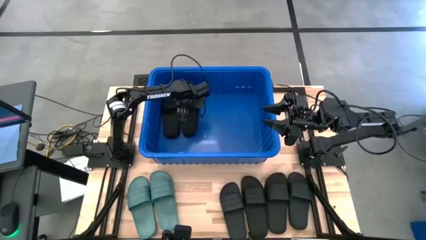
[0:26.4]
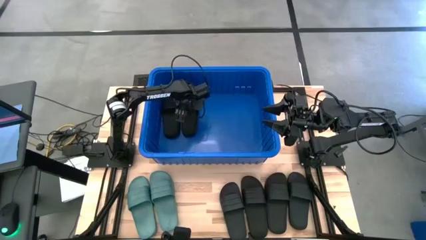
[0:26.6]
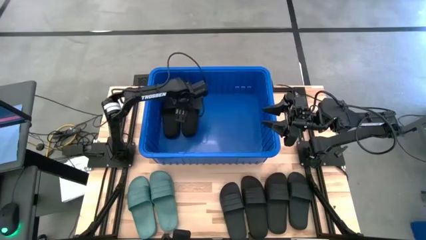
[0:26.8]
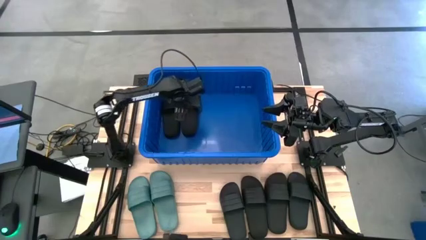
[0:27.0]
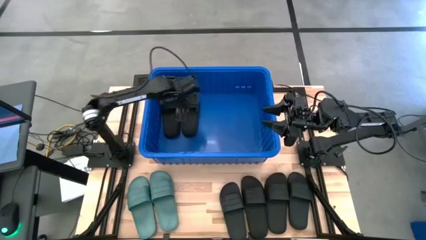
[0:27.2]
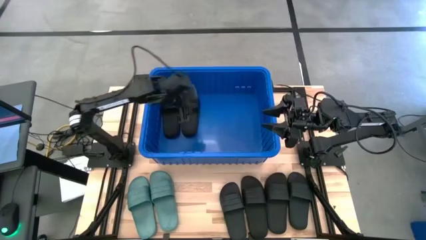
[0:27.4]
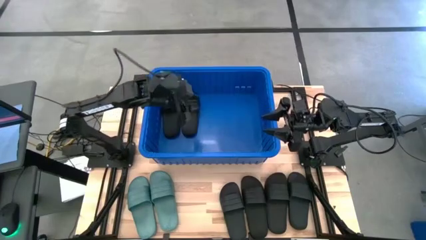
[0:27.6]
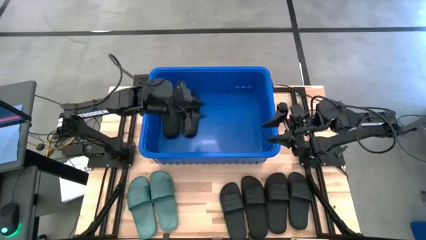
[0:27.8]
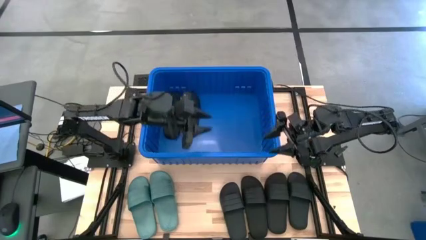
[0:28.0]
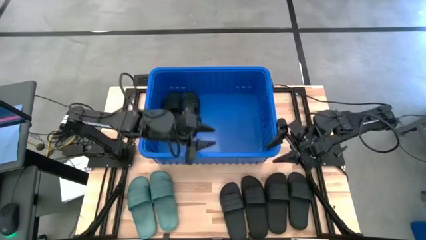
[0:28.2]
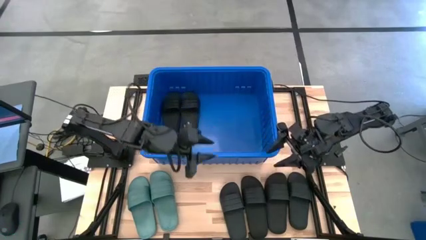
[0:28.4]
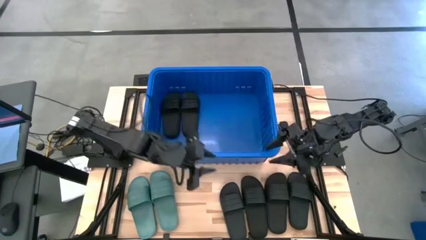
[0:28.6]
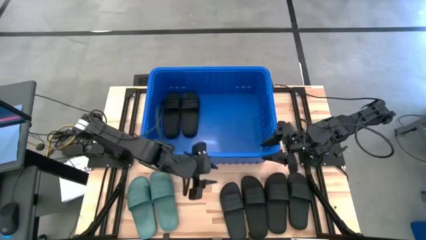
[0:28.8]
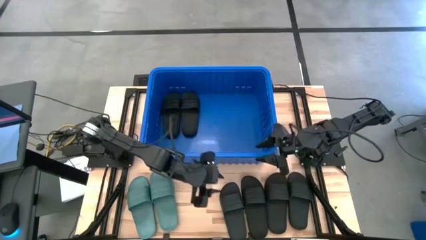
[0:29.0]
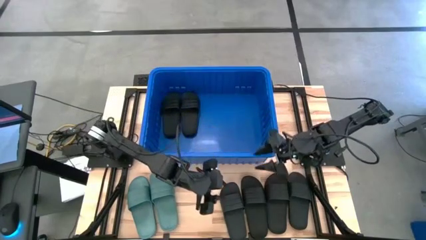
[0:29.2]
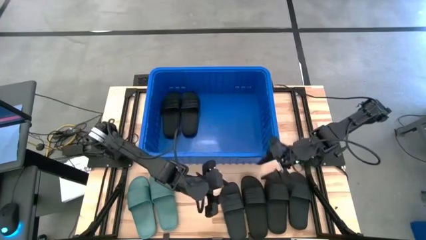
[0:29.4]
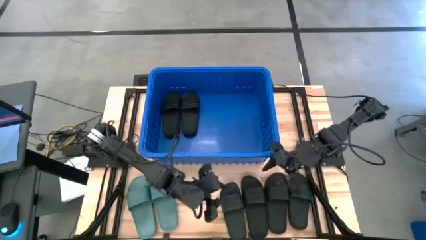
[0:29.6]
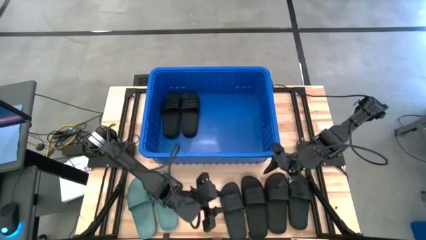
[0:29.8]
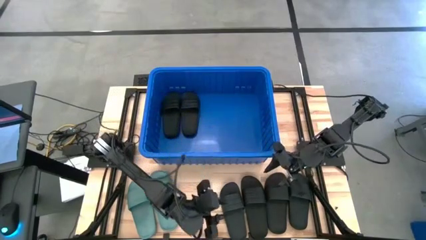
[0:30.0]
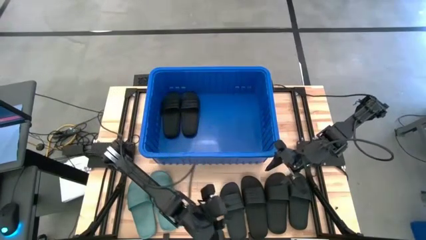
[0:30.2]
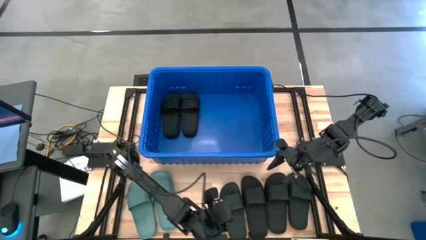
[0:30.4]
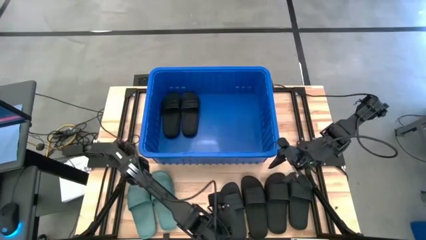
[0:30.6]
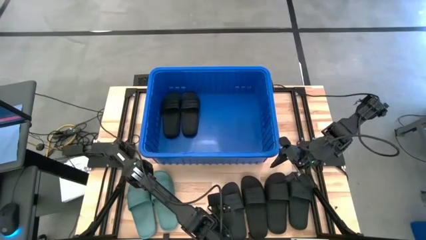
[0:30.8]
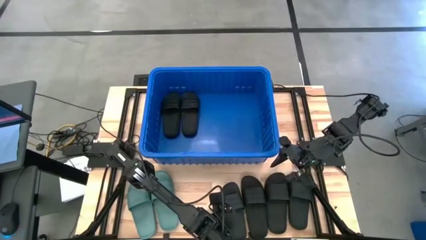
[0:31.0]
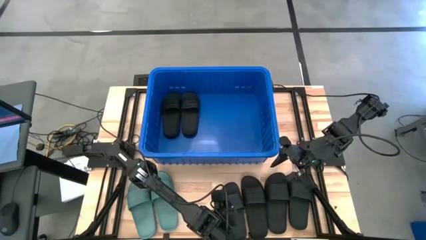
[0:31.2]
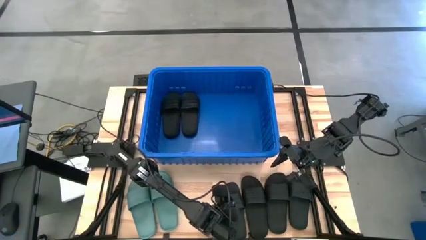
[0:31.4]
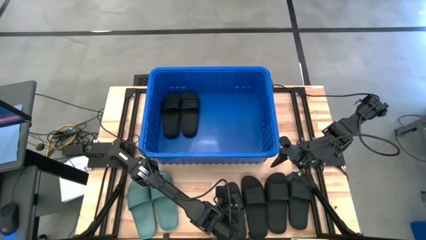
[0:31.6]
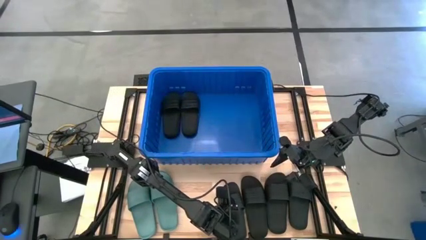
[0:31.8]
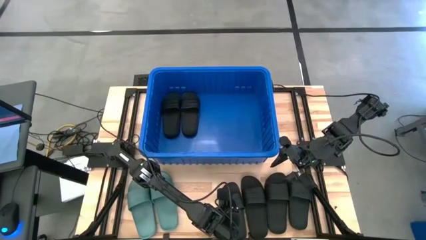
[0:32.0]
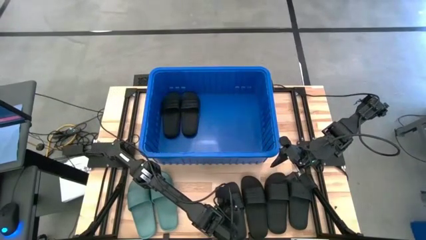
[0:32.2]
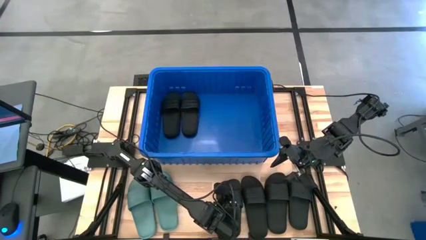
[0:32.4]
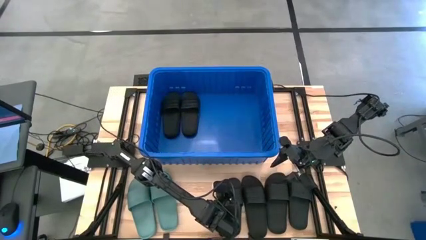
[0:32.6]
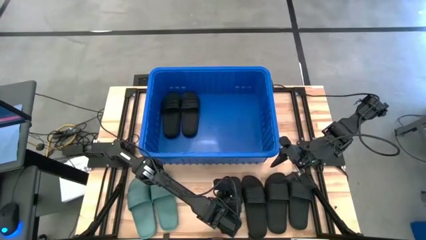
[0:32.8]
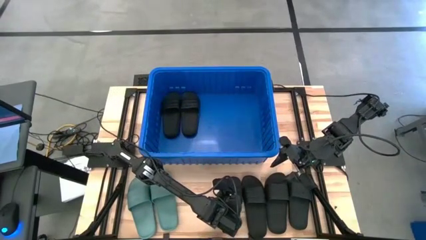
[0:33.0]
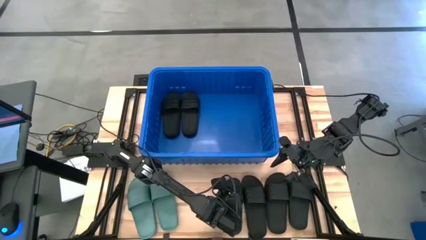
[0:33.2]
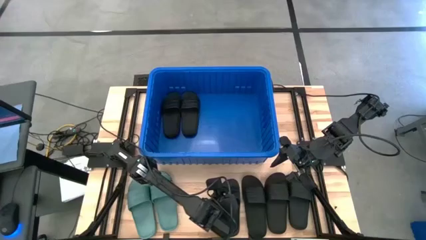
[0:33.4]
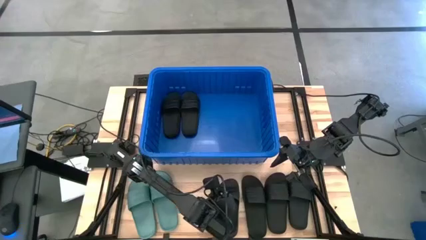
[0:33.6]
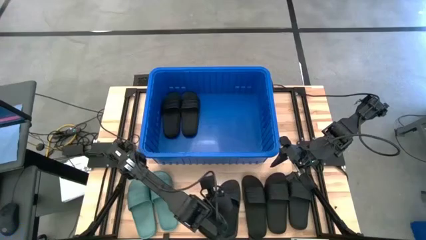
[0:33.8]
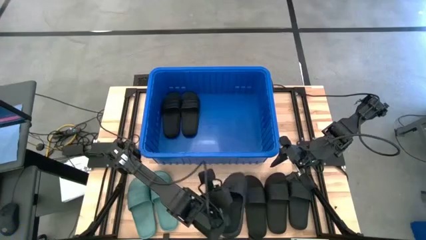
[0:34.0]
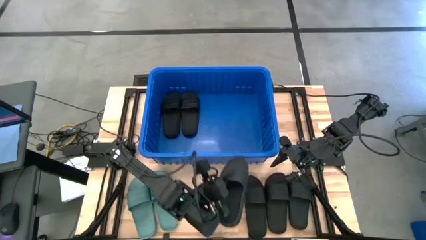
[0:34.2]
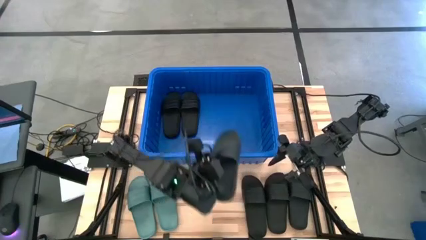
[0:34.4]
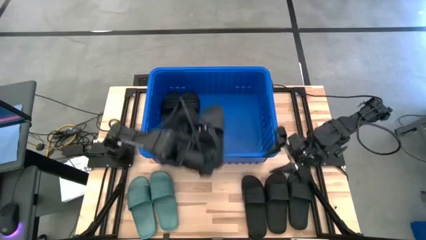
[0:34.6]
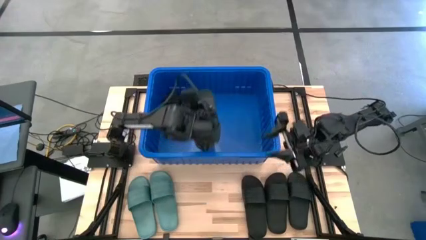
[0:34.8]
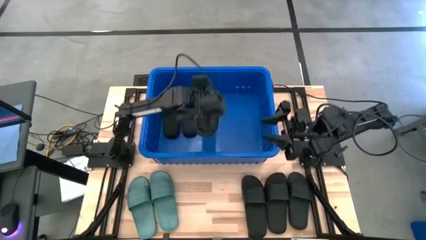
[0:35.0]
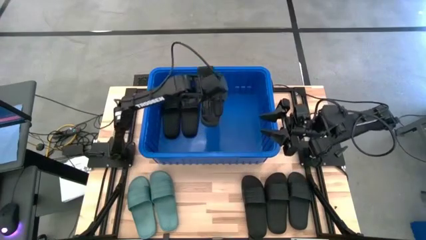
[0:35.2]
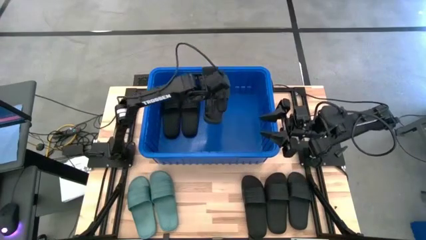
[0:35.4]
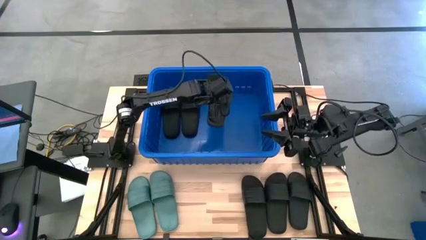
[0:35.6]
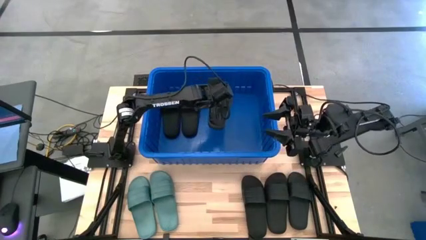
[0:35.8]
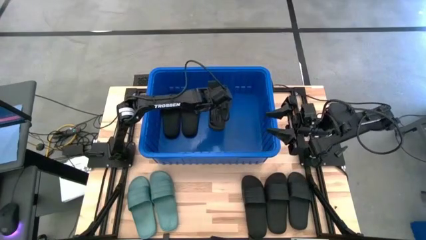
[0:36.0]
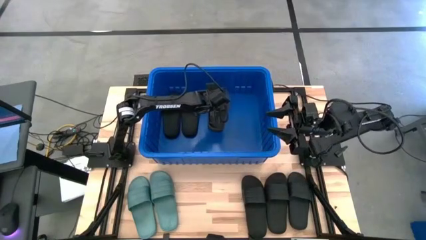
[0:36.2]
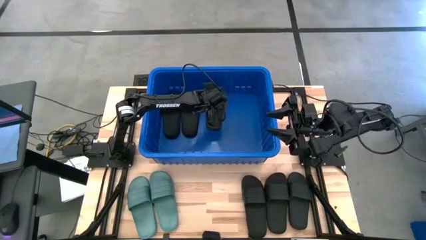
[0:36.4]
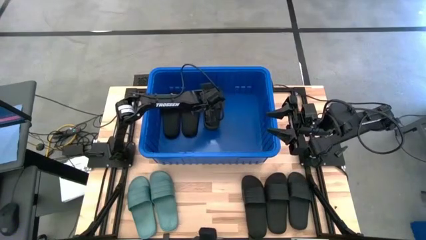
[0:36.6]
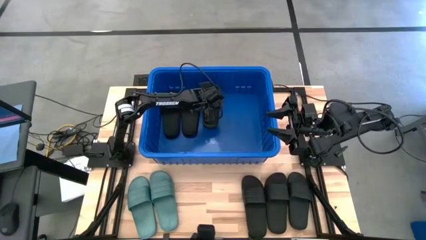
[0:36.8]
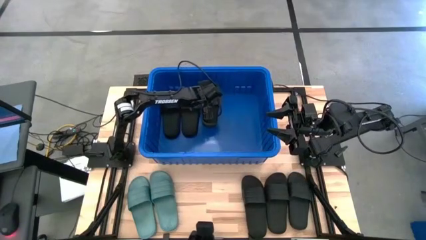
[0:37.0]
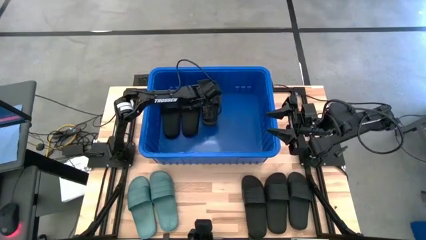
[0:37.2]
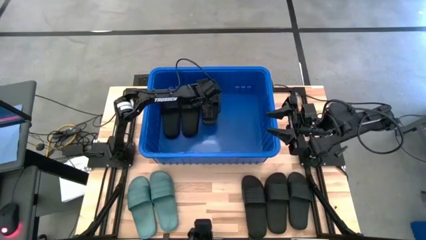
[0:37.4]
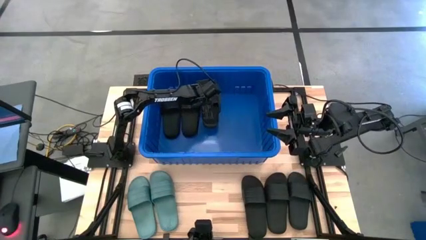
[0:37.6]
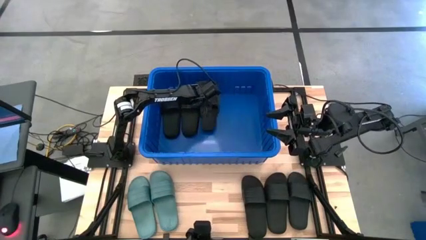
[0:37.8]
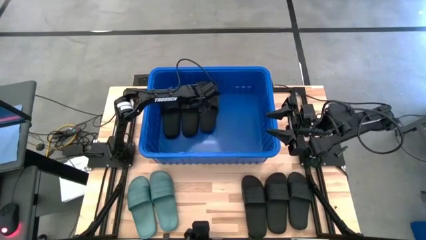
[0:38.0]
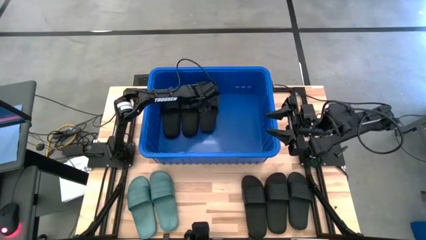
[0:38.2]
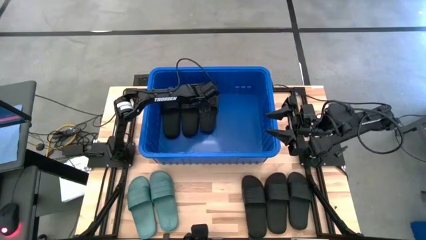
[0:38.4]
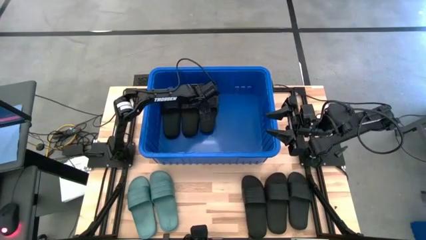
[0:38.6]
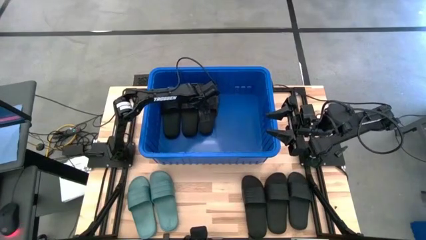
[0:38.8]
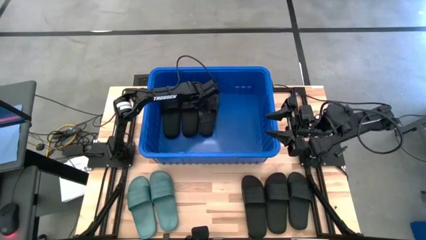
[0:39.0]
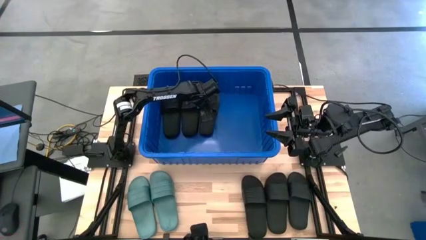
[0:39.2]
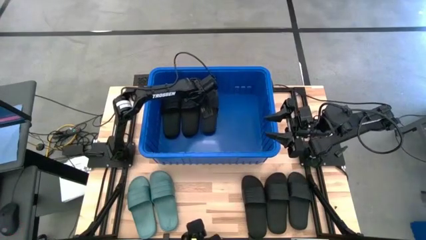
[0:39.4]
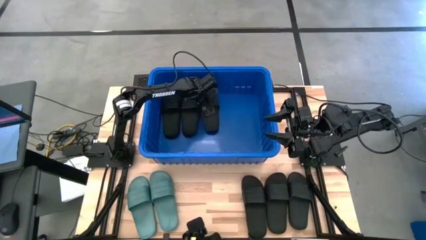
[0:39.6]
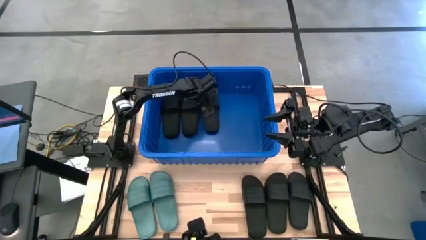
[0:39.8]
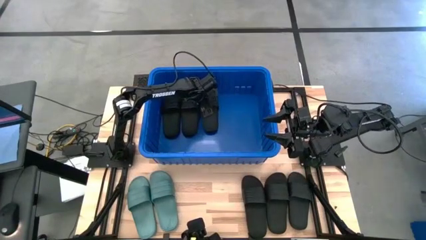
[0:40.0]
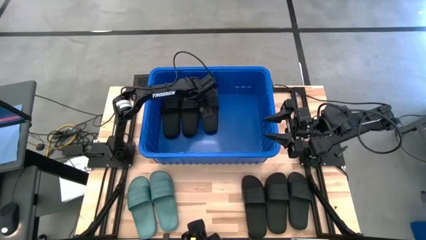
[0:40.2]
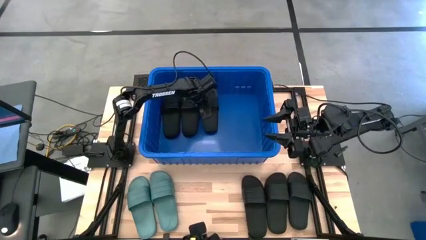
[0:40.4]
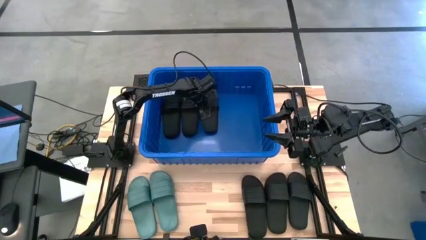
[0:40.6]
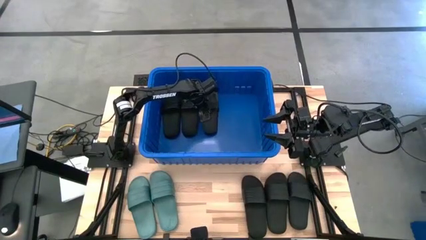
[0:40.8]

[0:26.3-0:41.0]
Task: Pick and place slides into bin
Put the black slide into the blue bin

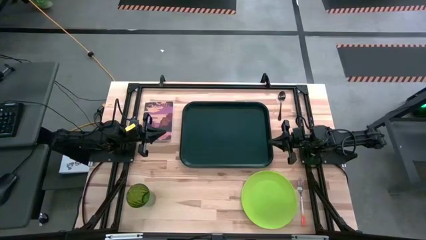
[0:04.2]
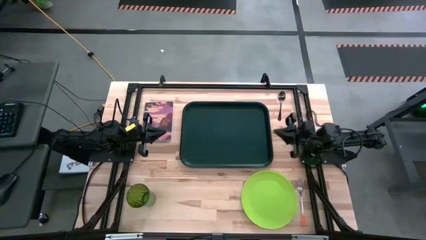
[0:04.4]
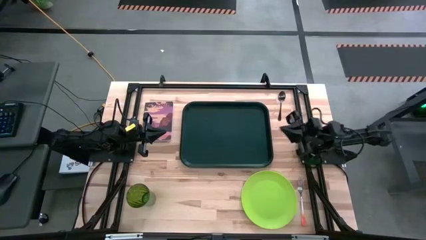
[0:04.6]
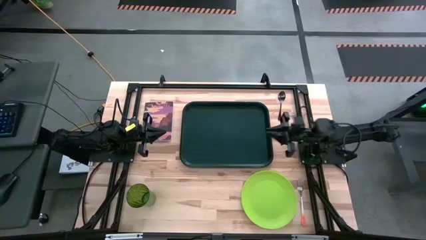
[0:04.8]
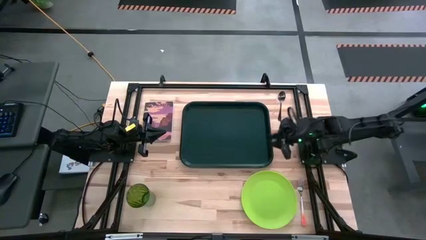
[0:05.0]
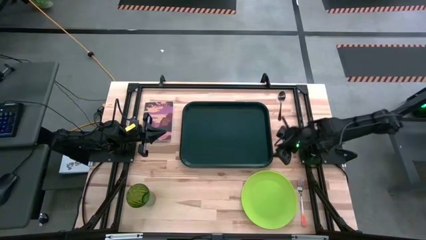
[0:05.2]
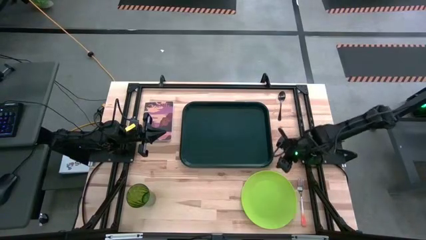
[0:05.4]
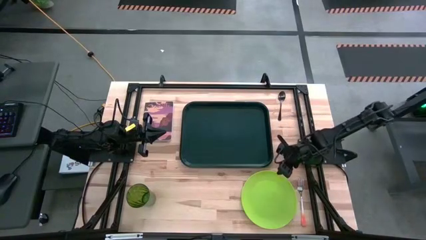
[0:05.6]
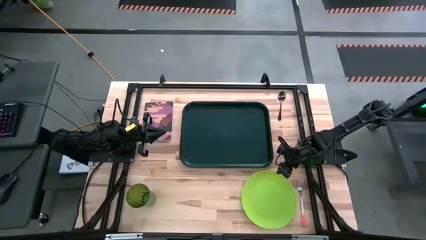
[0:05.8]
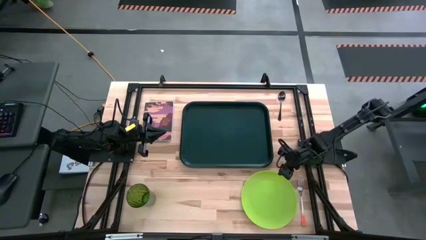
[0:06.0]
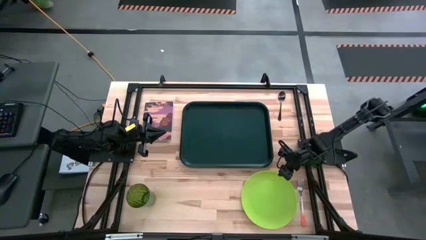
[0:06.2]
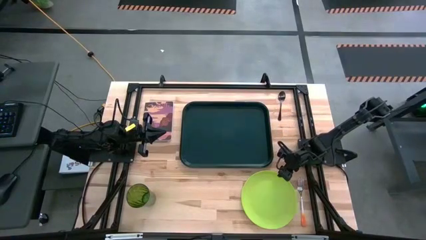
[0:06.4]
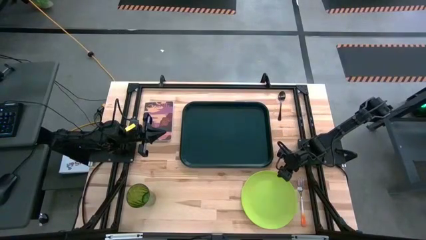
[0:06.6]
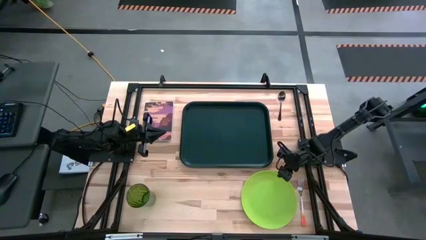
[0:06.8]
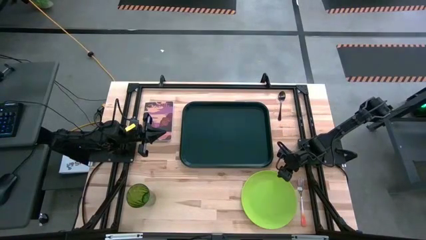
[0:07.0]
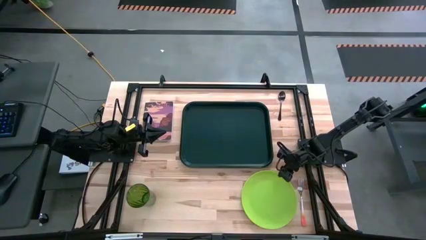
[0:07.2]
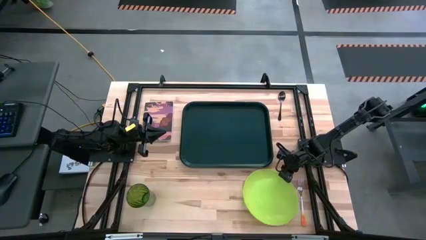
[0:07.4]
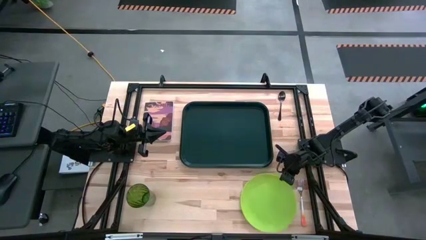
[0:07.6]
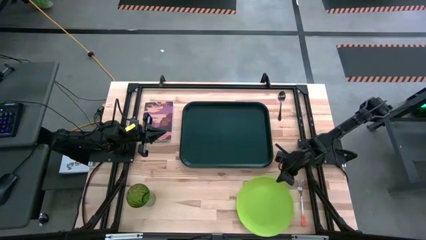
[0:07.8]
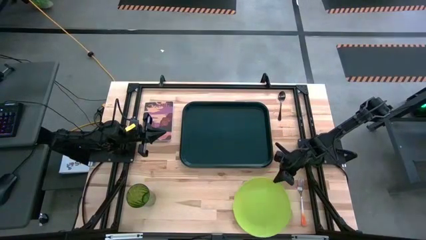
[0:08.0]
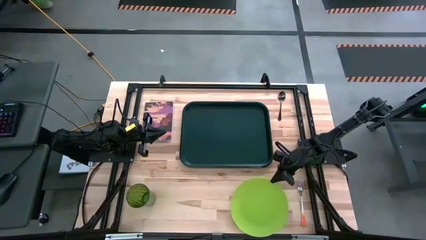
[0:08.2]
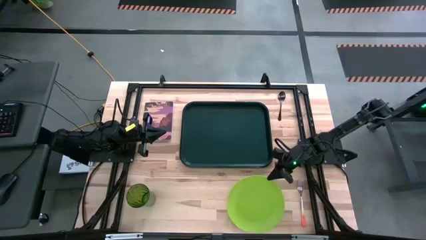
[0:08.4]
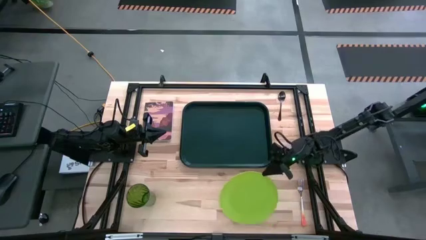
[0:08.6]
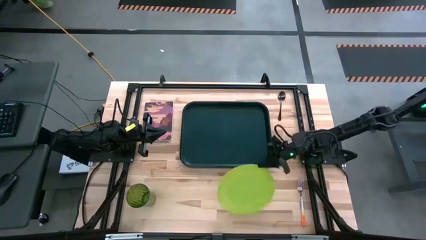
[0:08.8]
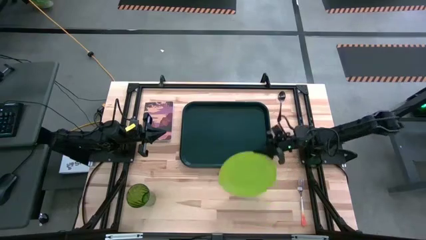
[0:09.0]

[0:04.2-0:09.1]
Task: Pick and place plate/cup/fork/spoon on tray
Put the green plate on the black serving tray
